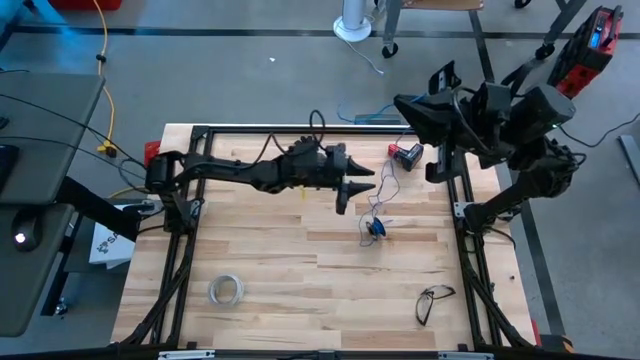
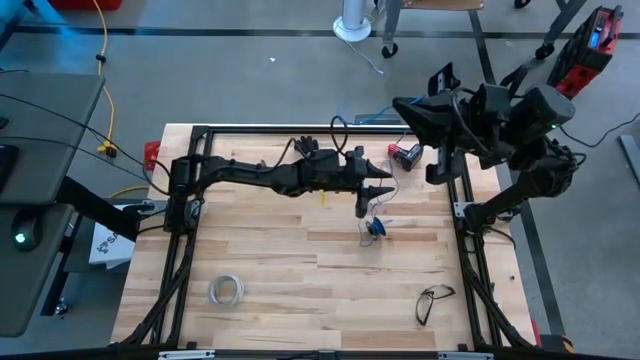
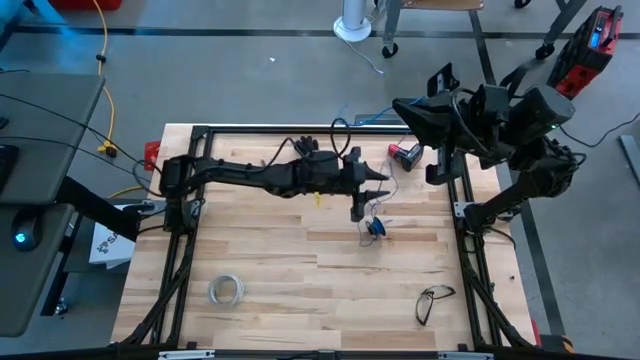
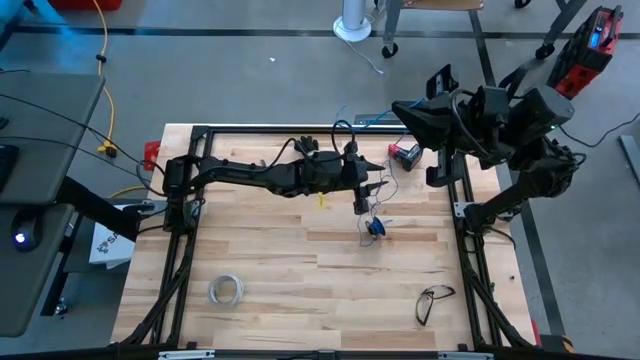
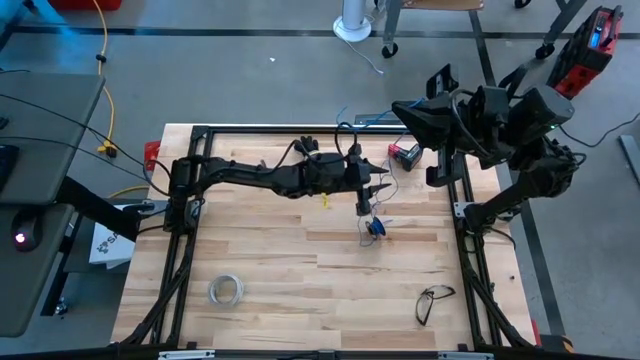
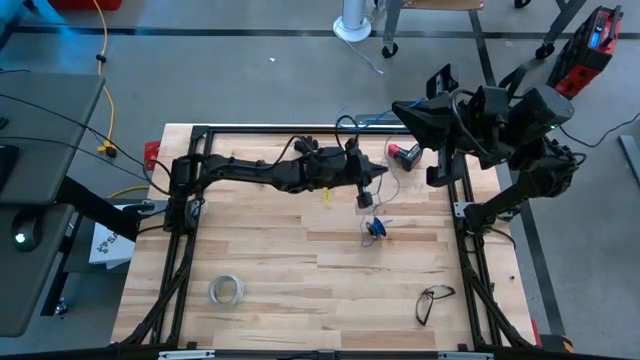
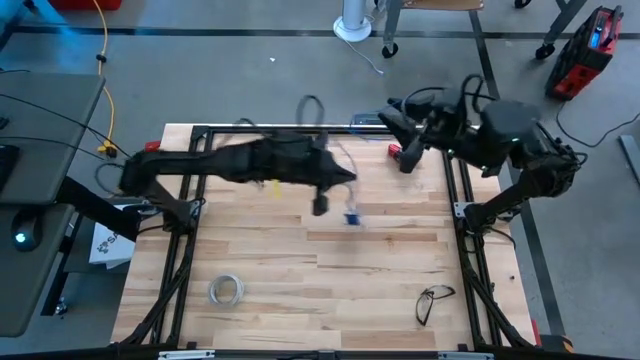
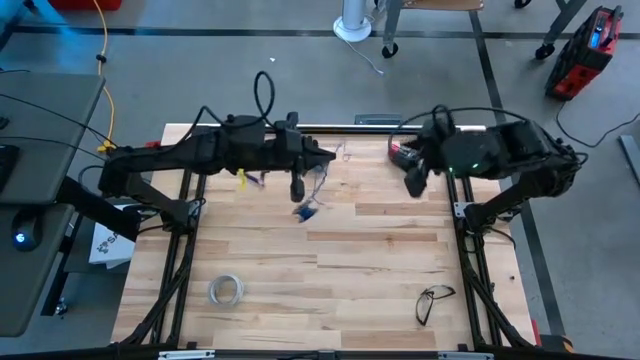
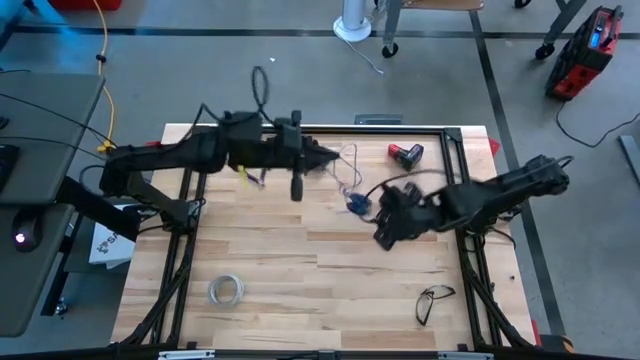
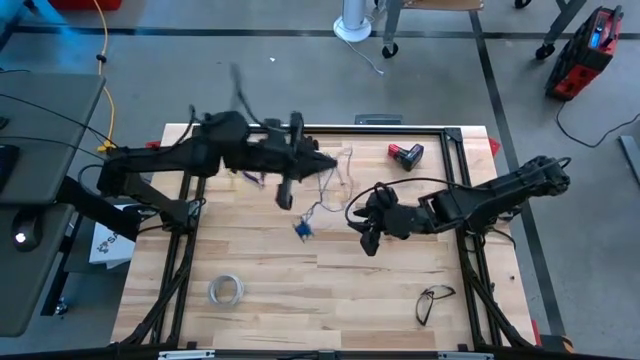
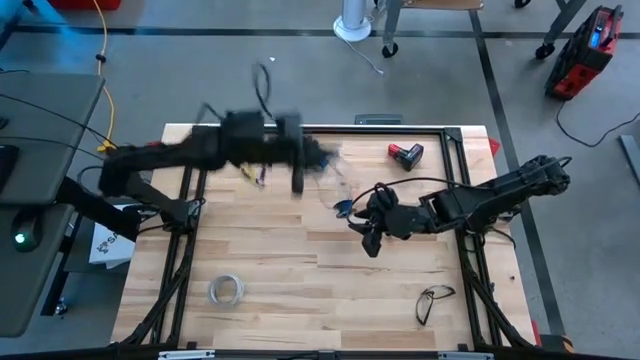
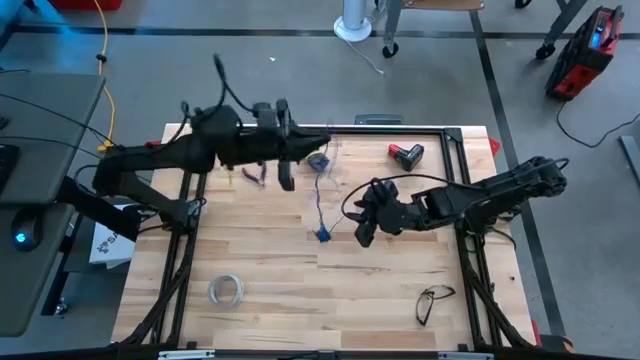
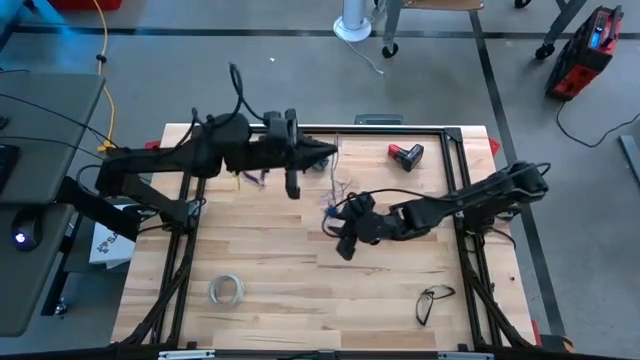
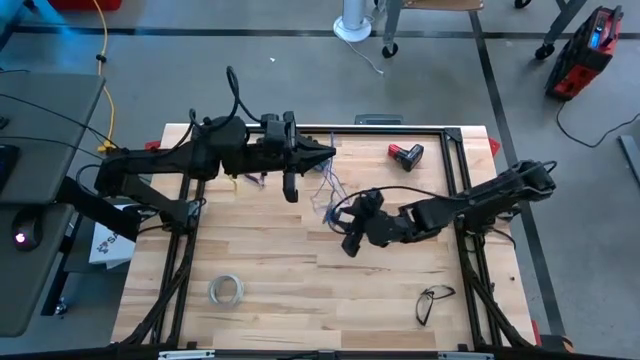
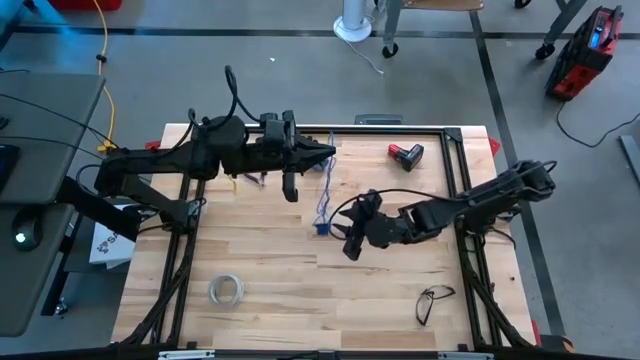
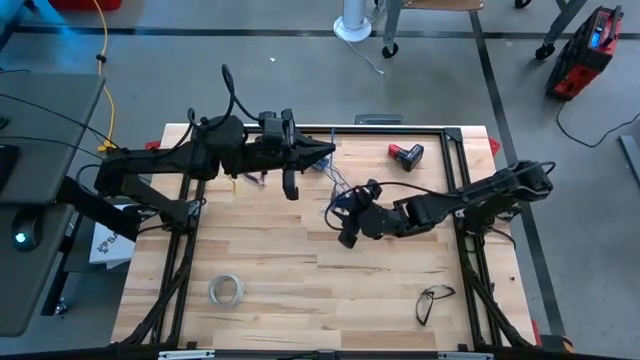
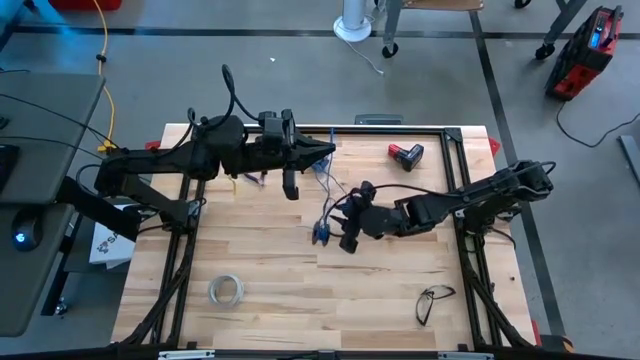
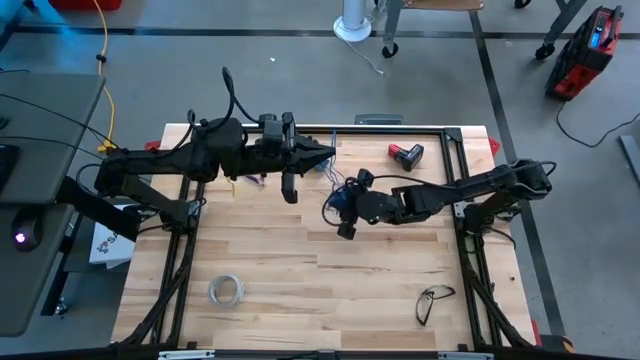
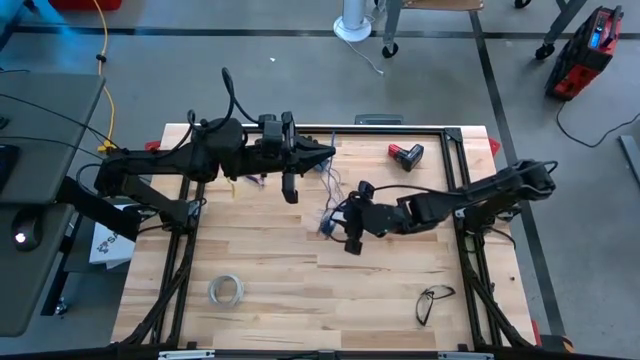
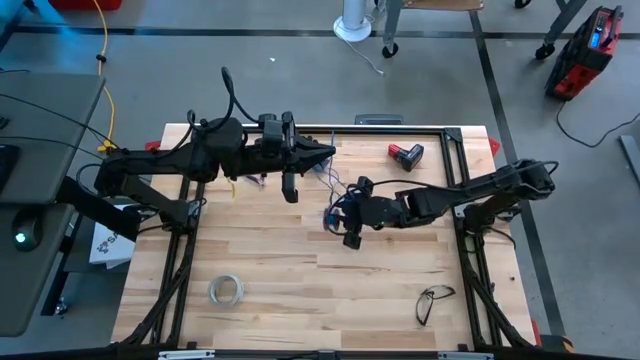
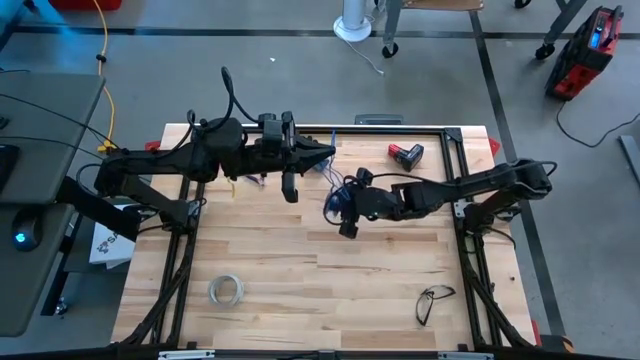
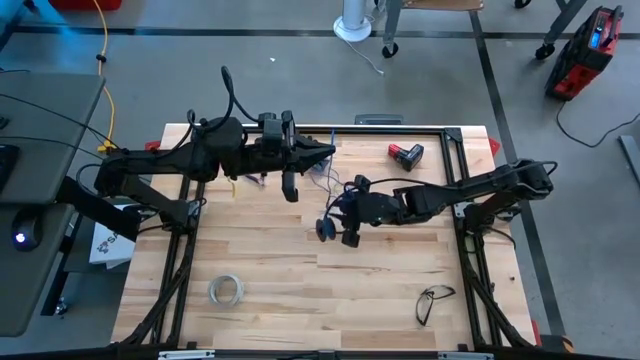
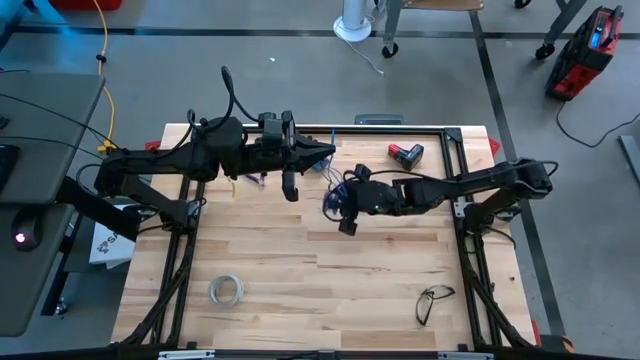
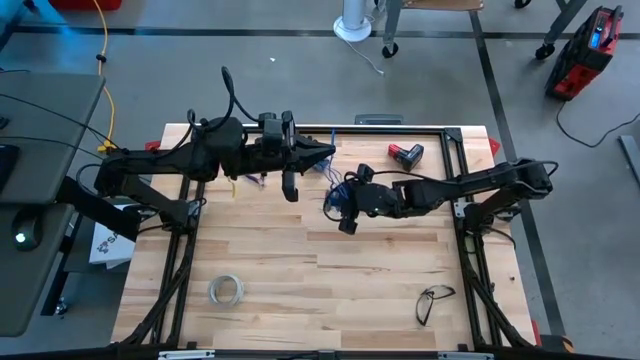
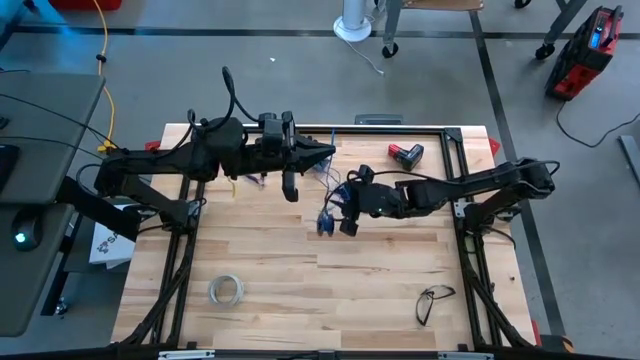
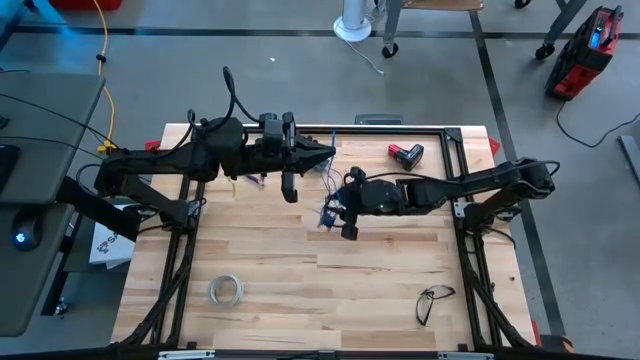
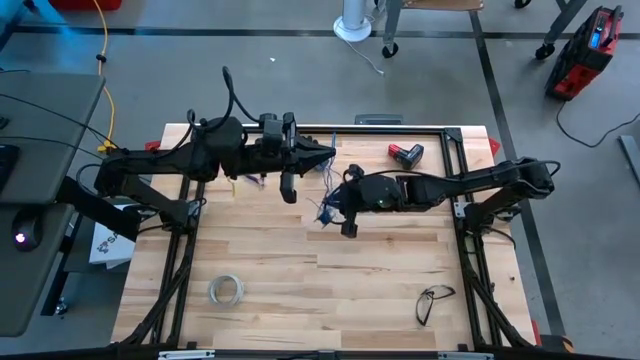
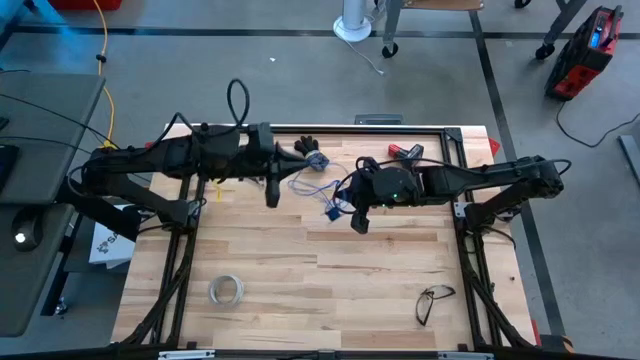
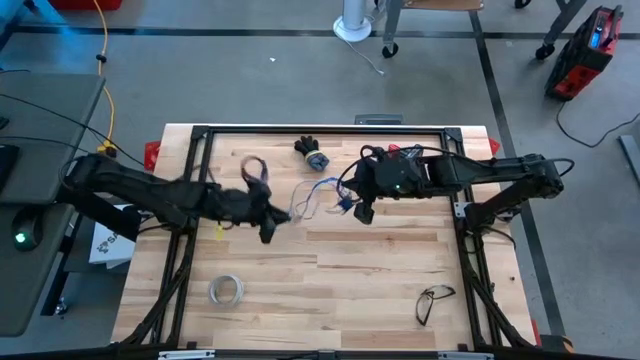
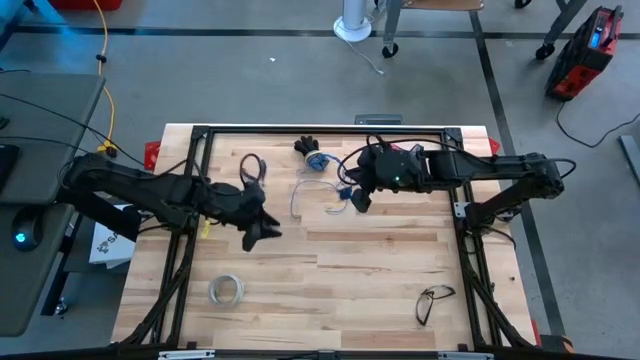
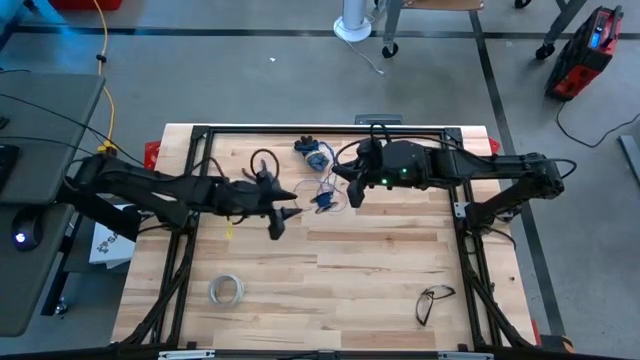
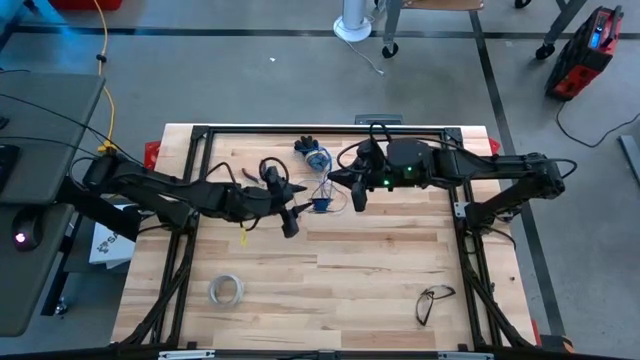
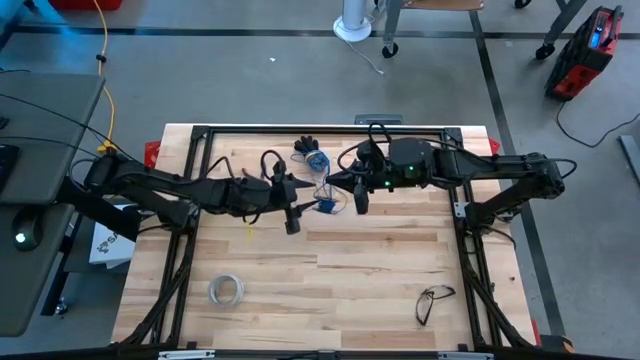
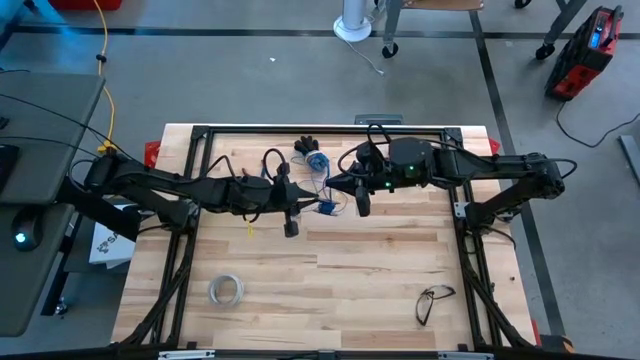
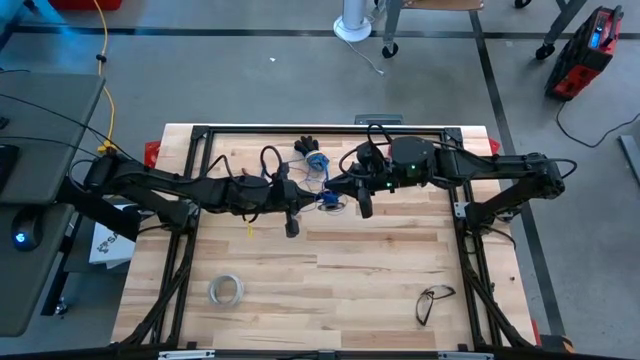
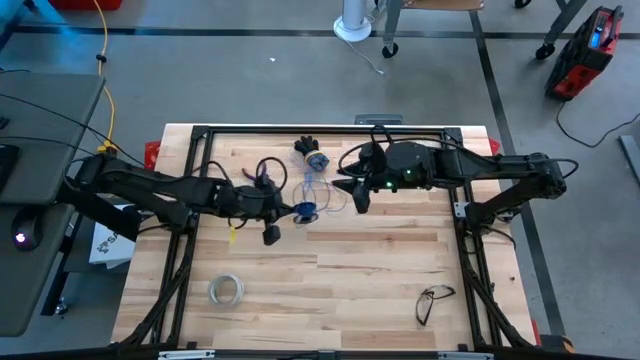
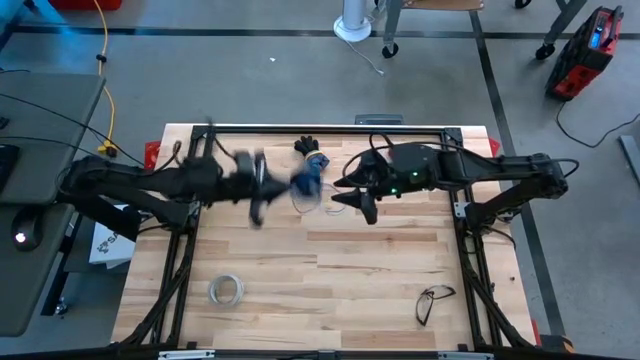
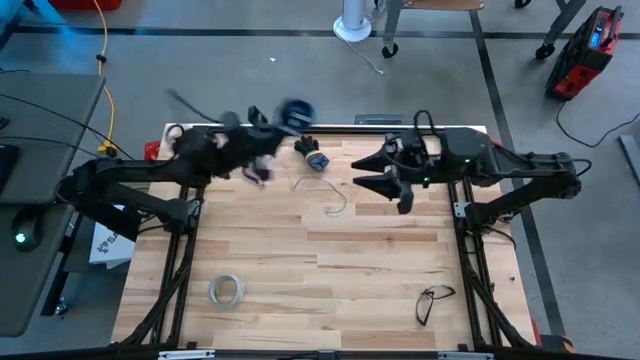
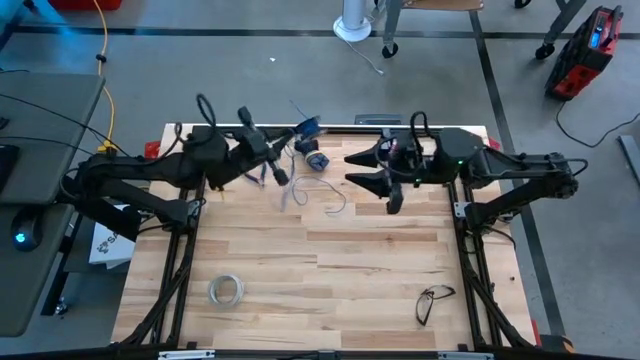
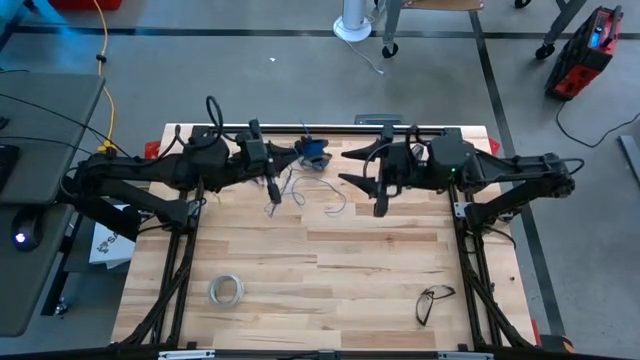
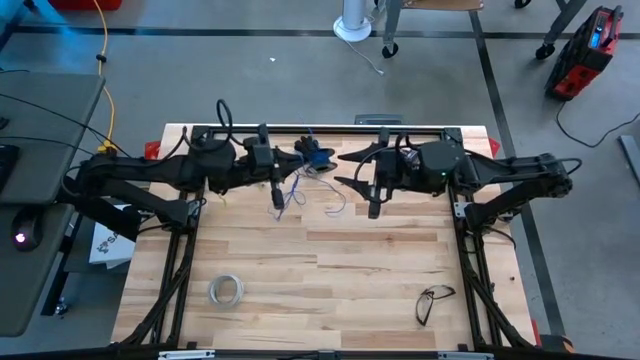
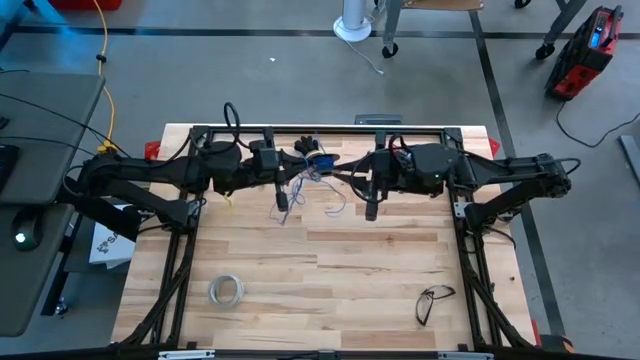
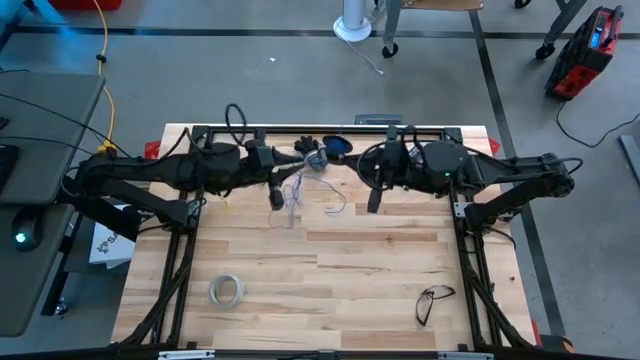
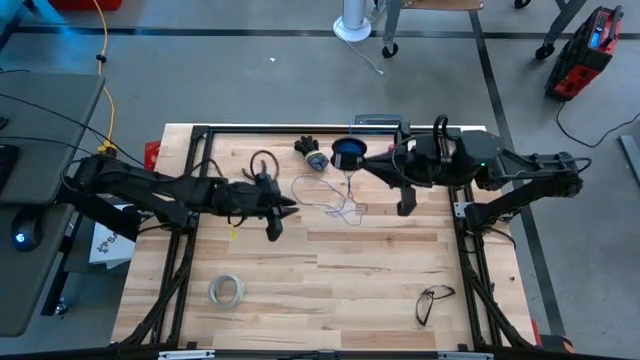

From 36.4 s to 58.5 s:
Task: Coil cords
Uncoil the blue wire from the black spool
